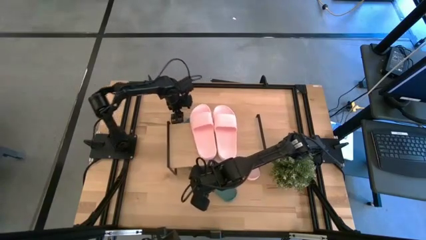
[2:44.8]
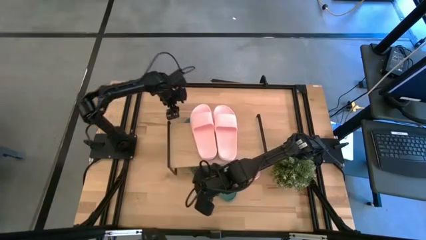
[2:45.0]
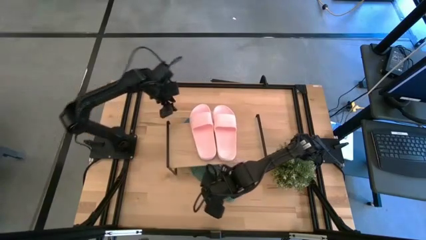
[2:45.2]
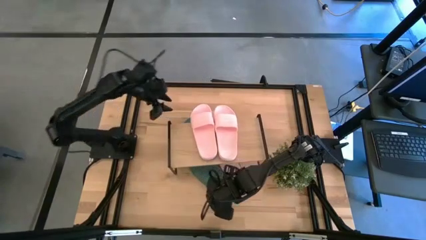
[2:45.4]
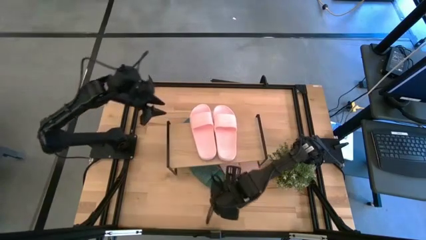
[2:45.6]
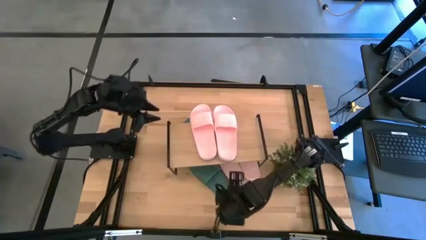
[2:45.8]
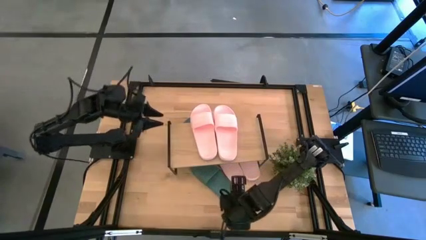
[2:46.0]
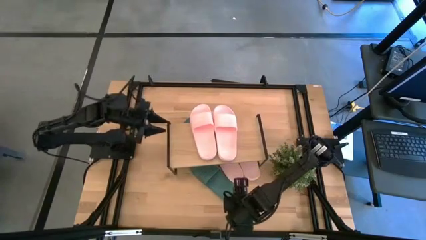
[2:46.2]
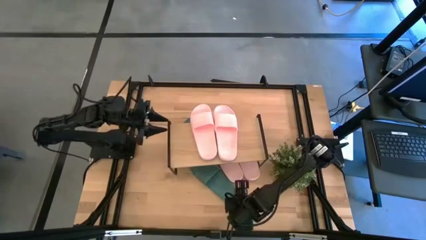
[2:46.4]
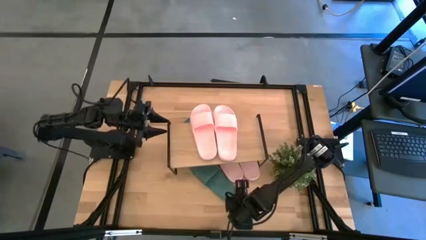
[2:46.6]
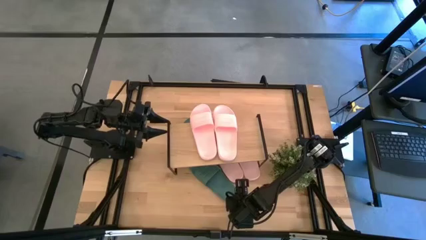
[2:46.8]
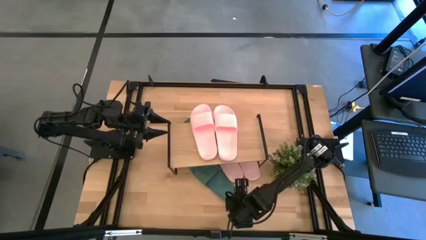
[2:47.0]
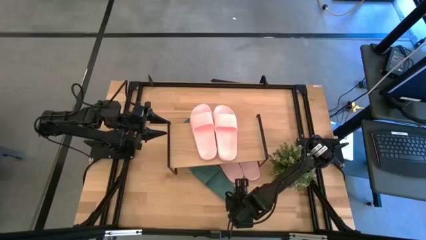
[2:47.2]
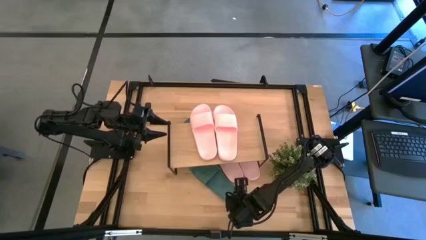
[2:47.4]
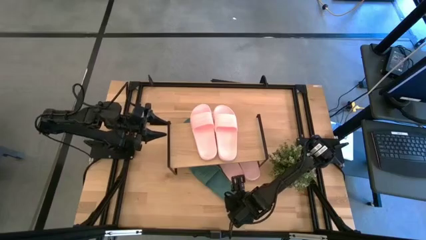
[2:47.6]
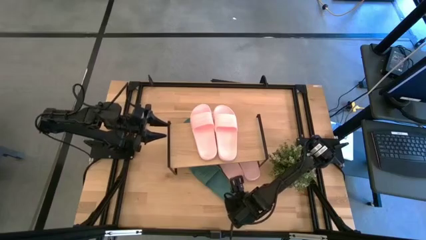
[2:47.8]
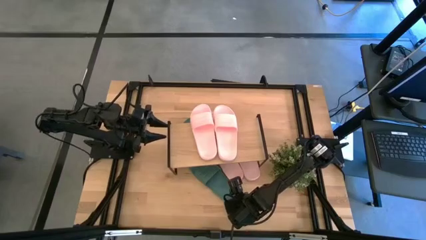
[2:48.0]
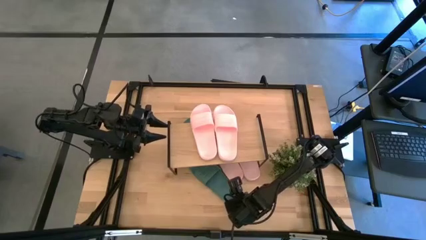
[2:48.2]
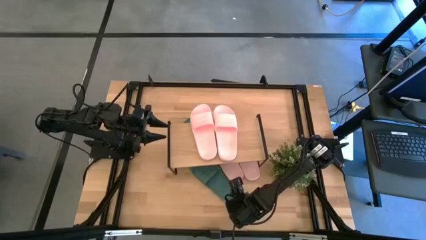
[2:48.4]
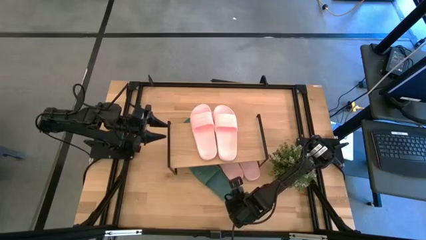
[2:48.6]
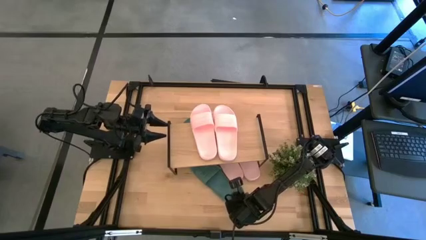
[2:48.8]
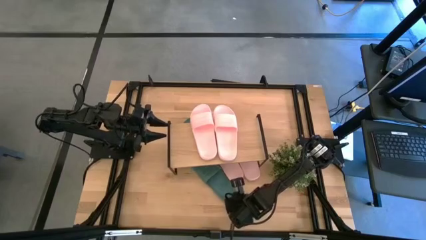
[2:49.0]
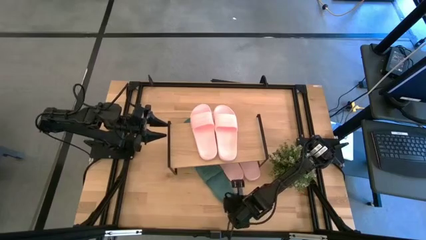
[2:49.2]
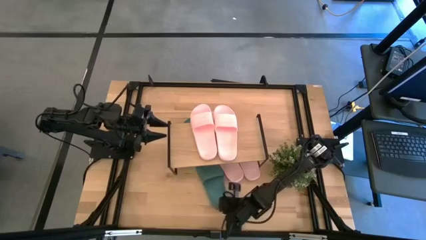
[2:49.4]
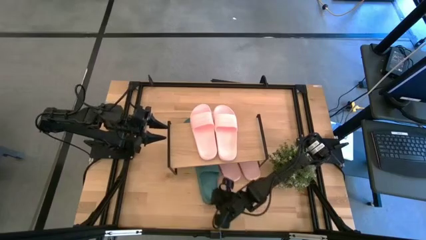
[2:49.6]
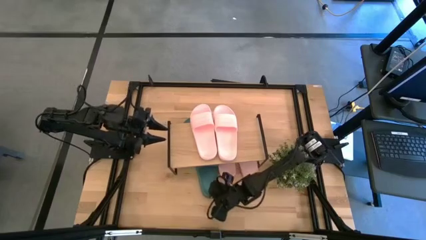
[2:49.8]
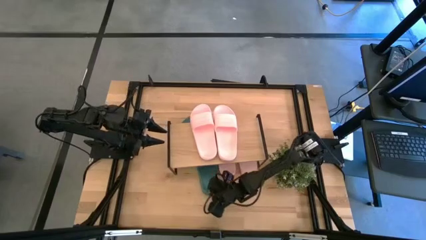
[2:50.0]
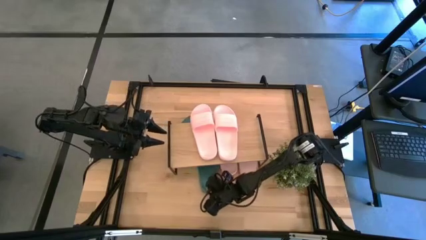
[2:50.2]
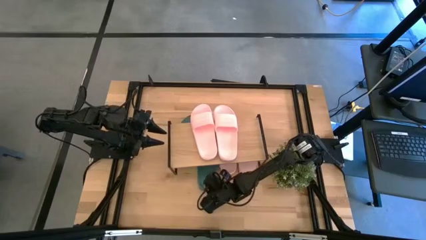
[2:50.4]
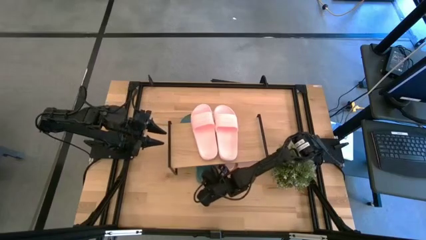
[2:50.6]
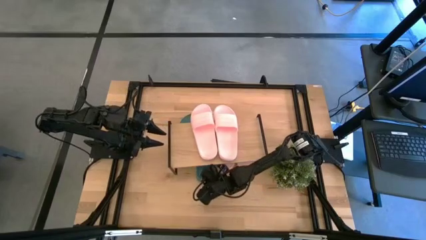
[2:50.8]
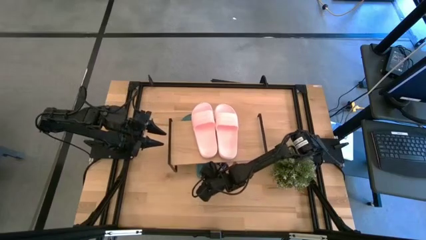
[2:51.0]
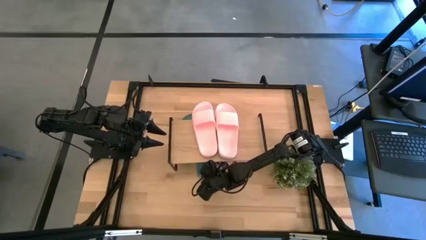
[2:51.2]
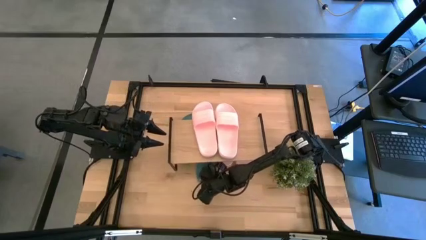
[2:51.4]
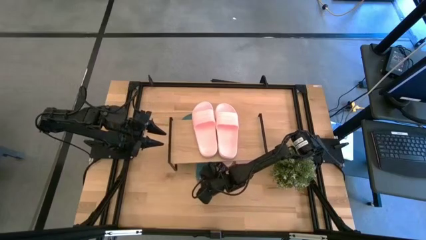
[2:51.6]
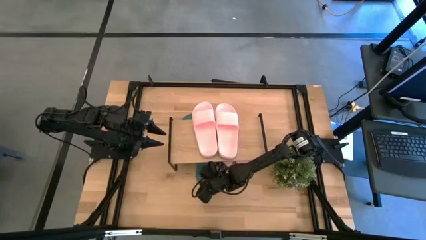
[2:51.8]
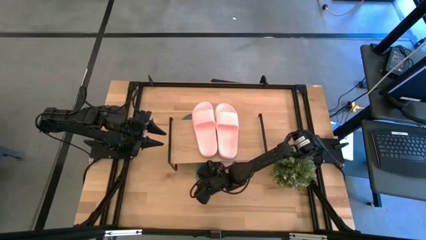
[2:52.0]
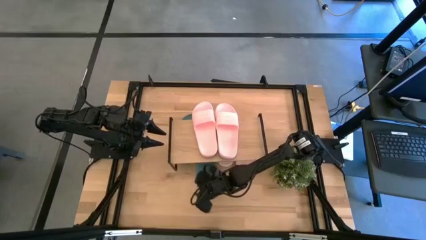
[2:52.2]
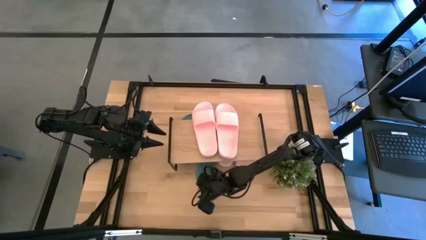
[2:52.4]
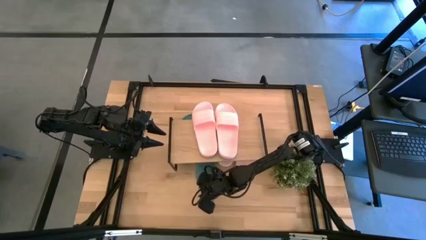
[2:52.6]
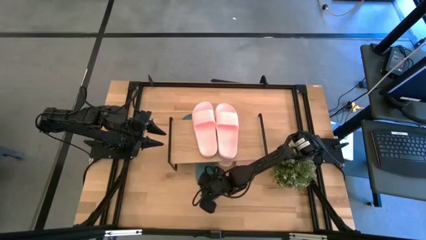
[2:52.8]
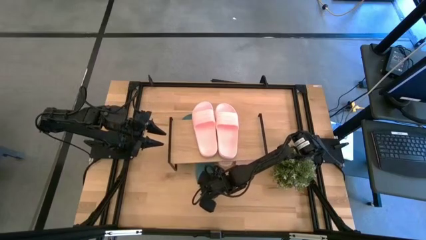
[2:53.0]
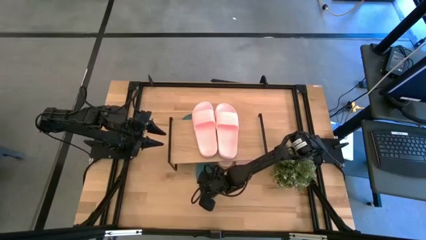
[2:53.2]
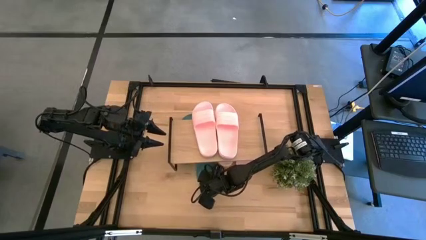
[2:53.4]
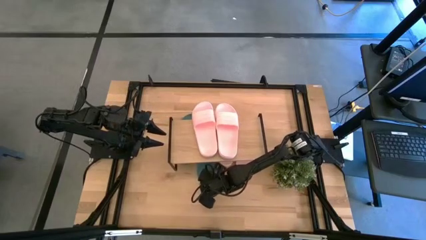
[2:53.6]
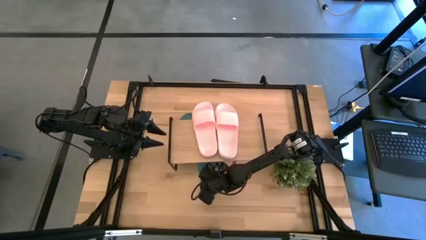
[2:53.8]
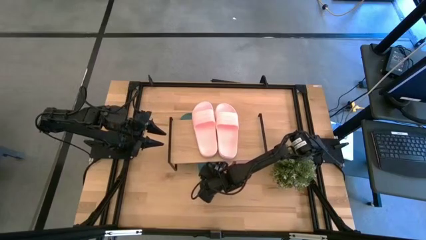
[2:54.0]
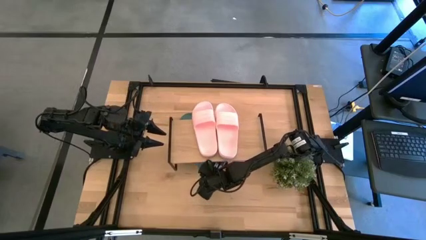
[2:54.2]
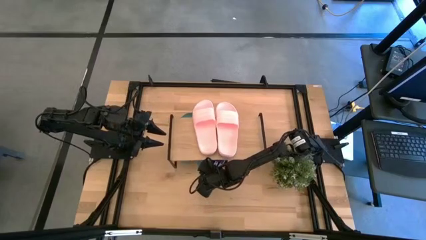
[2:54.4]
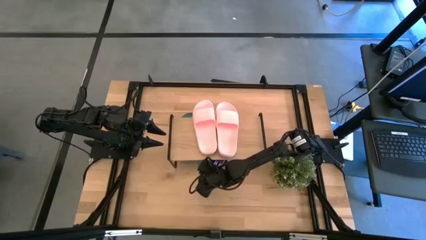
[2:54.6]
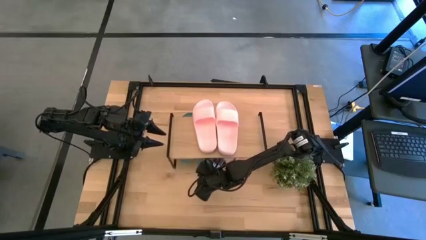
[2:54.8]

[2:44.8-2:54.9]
Task: Pick and place slides into the shelf
Put the green slipper under the shelf

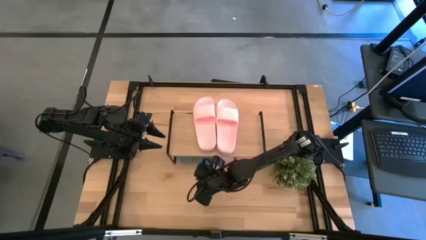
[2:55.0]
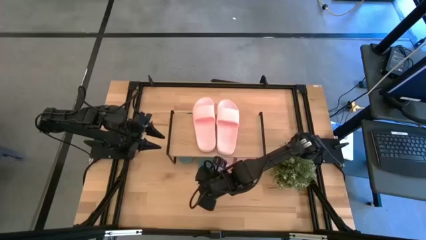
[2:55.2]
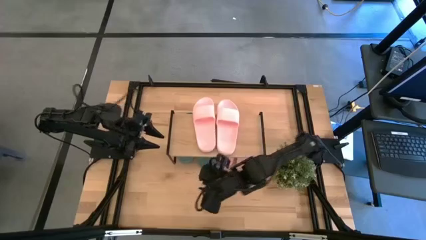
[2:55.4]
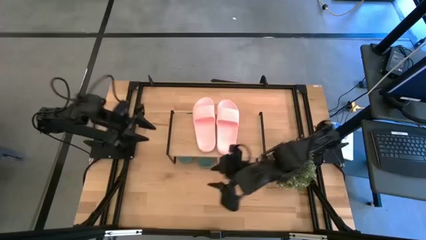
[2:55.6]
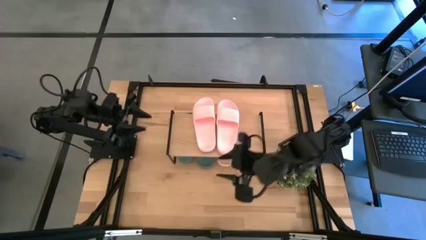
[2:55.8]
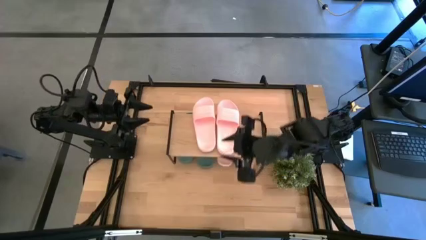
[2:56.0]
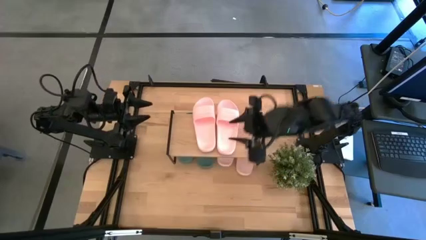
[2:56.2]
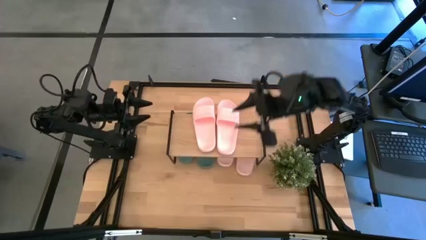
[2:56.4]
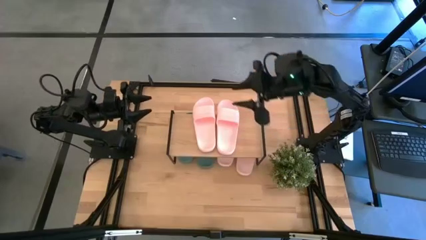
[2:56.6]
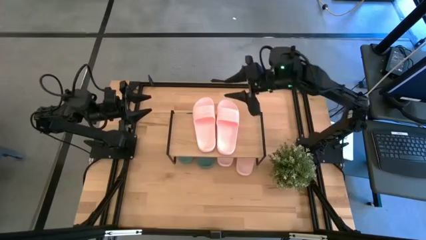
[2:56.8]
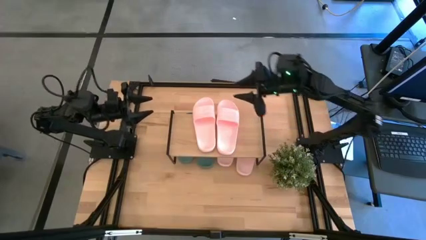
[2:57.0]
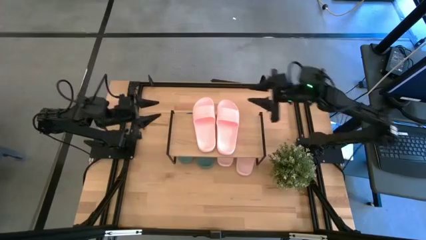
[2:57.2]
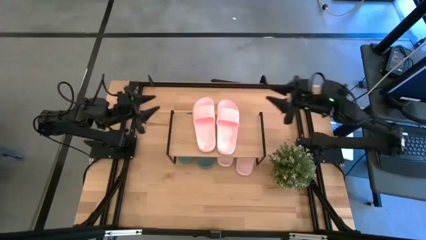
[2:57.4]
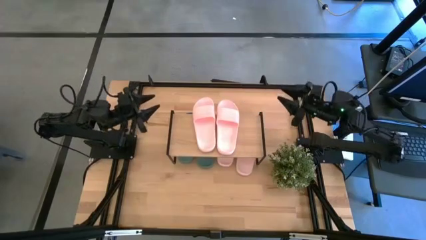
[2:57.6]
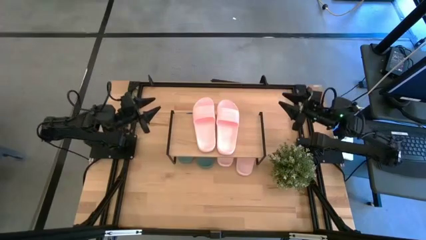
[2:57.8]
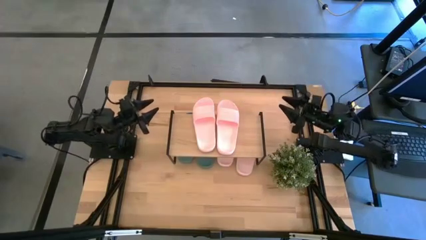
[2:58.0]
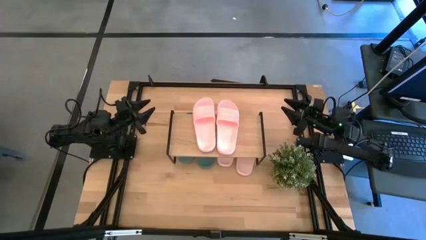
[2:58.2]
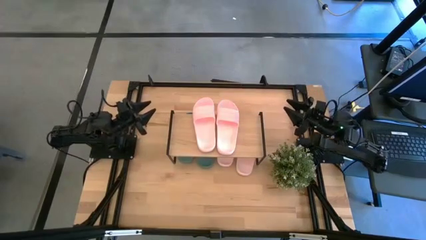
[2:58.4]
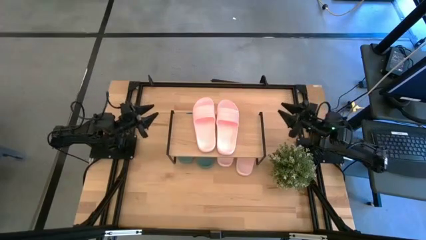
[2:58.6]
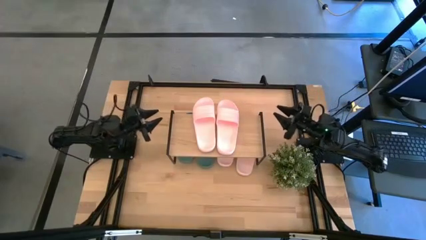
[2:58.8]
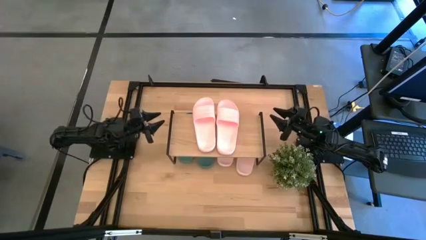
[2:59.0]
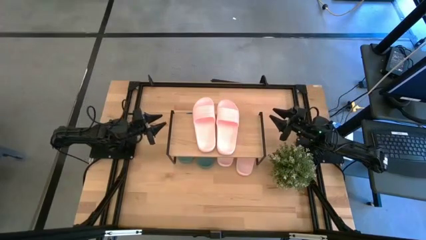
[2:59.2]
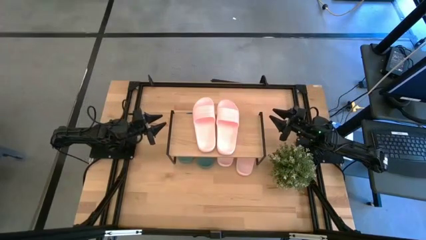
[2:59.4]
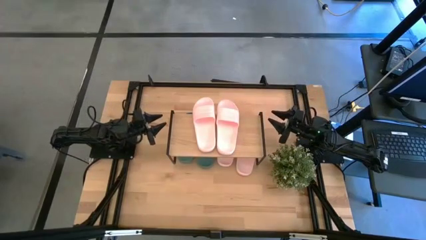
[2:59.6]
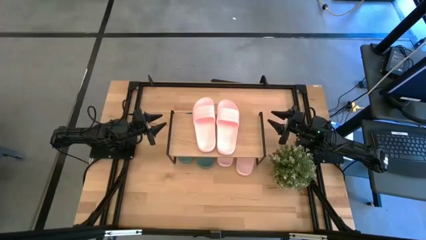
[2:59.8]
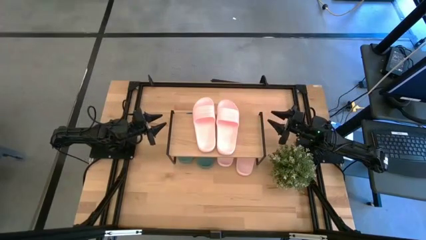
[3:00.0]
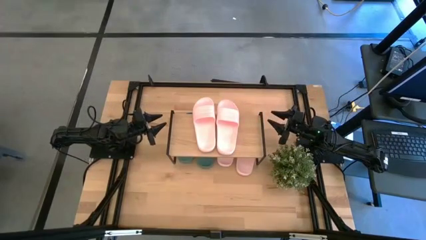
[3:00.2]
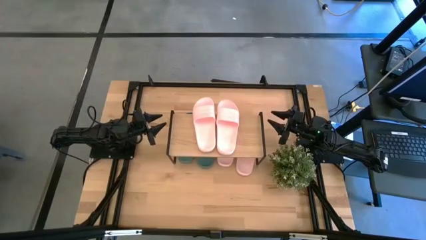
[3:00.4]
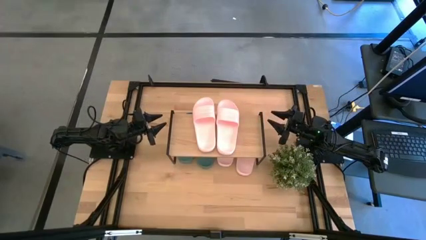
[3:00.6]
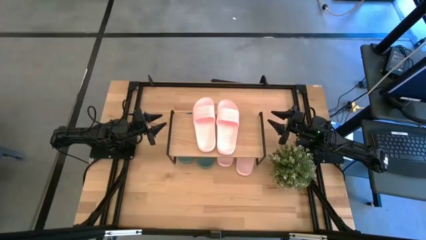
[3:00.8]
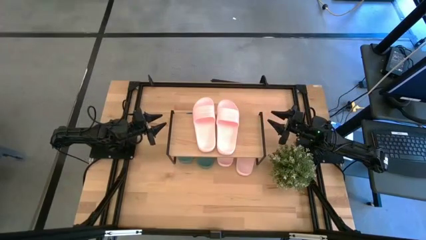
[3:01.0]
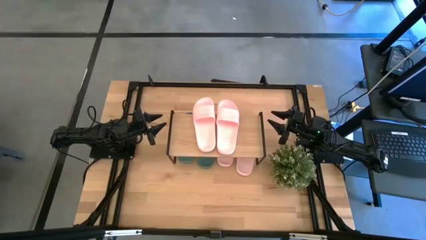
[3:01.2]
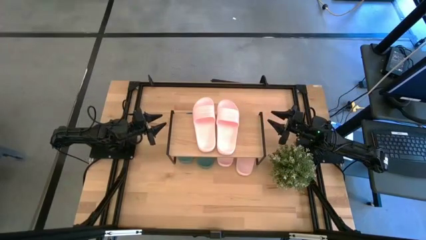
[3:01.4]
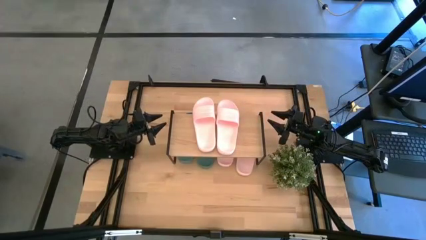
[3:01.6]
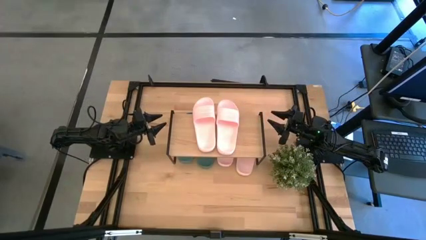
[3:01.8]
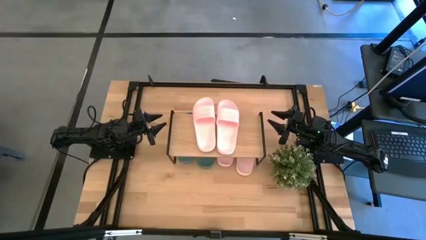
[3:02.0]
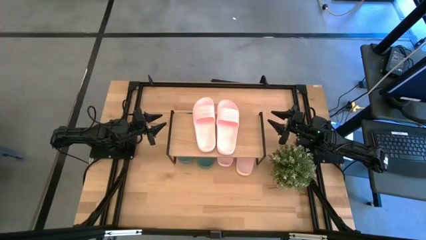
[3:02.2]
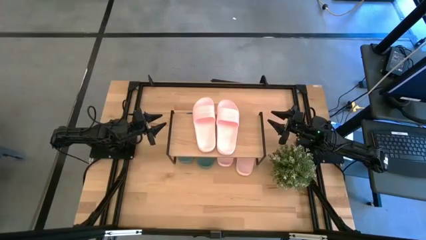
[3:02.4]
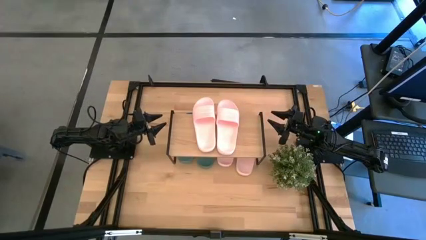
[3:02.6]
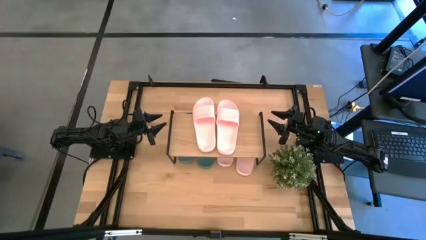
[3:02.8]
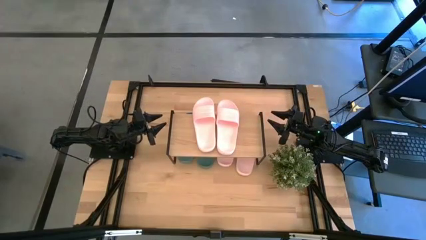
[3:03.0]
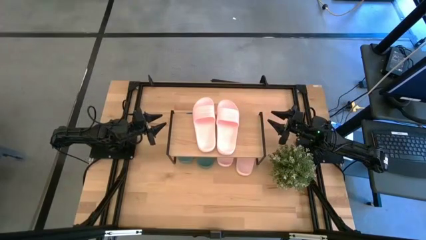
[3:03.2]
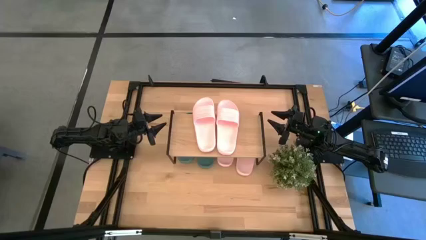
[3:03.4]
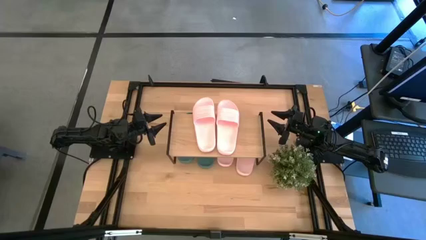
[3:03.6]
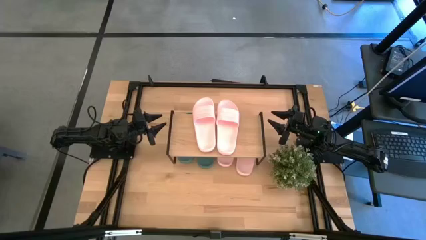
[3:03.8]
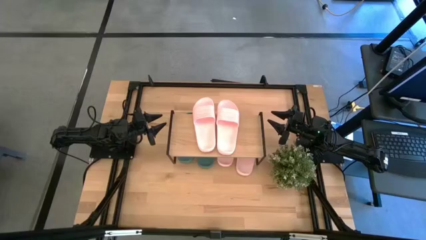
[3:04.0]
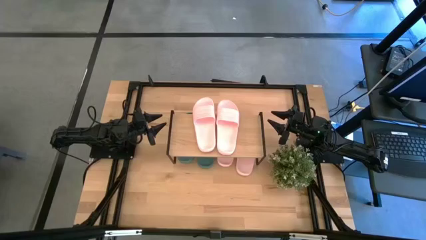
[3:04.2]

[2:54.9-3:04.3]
Return to Home Position
